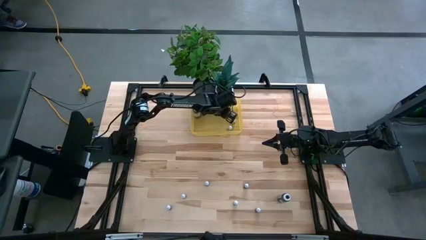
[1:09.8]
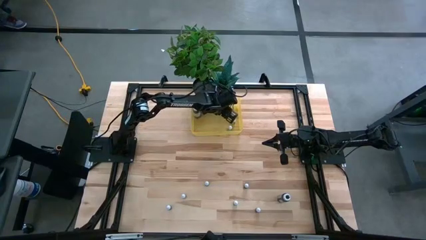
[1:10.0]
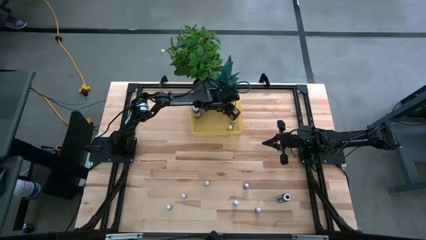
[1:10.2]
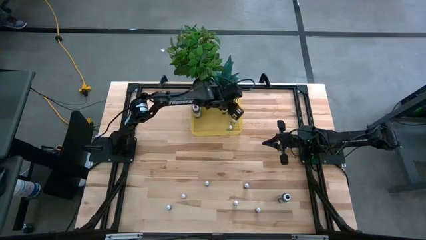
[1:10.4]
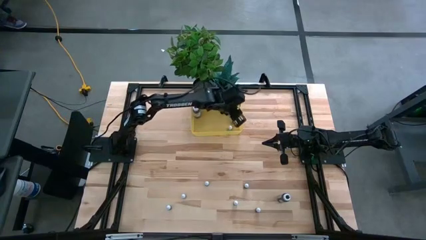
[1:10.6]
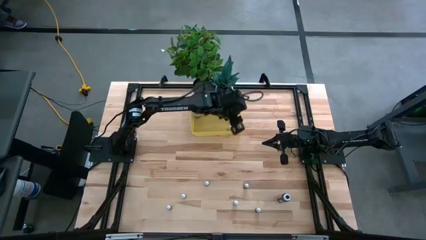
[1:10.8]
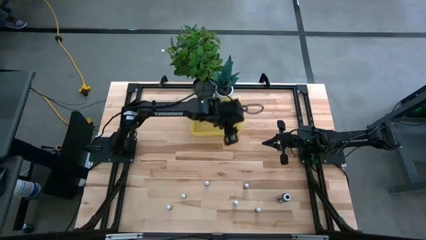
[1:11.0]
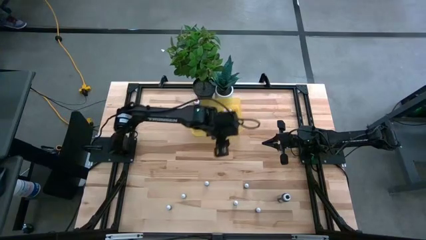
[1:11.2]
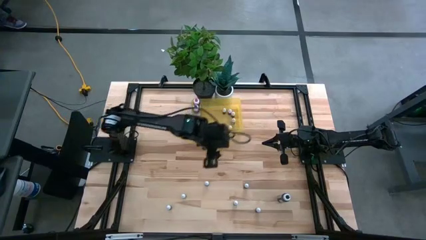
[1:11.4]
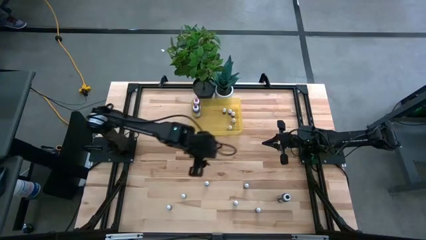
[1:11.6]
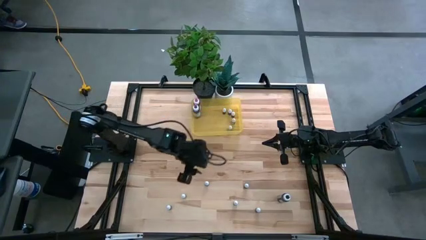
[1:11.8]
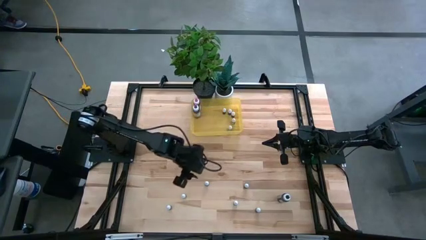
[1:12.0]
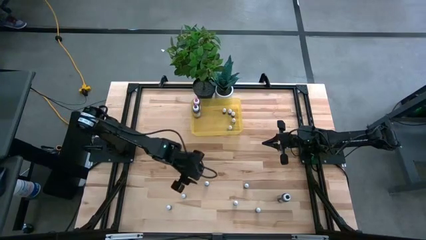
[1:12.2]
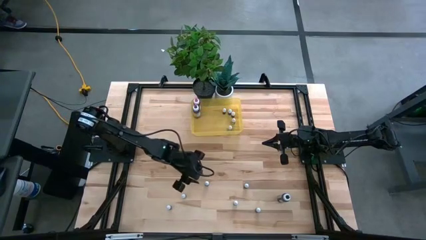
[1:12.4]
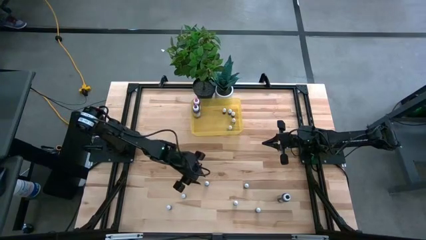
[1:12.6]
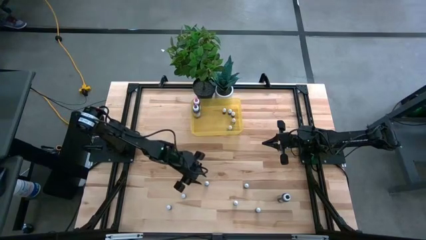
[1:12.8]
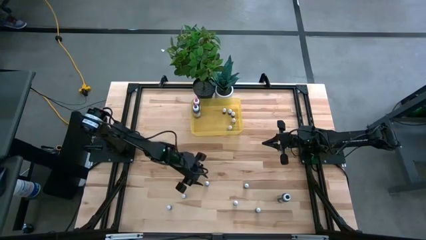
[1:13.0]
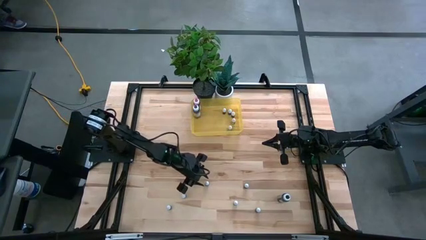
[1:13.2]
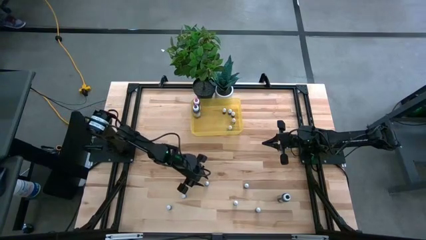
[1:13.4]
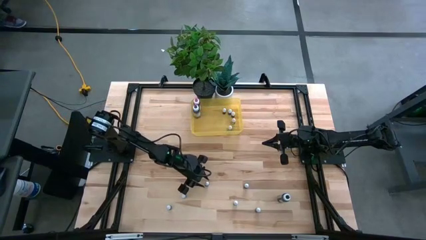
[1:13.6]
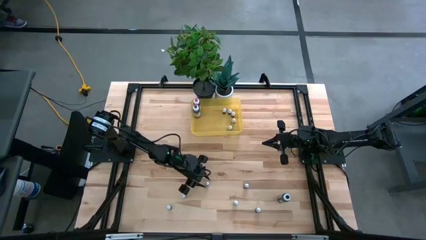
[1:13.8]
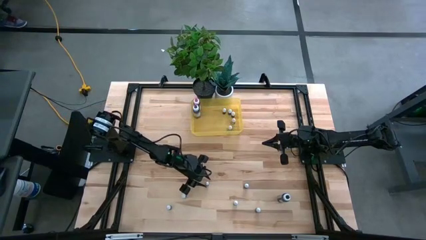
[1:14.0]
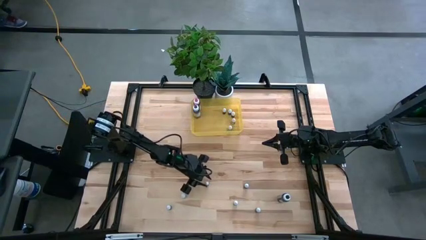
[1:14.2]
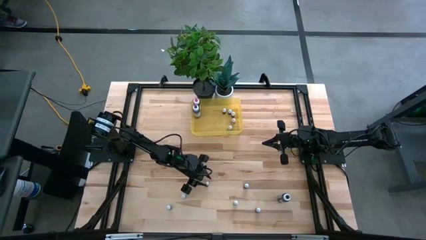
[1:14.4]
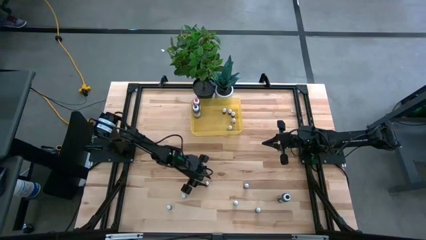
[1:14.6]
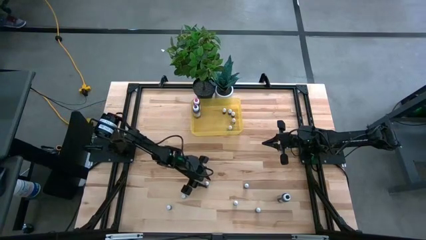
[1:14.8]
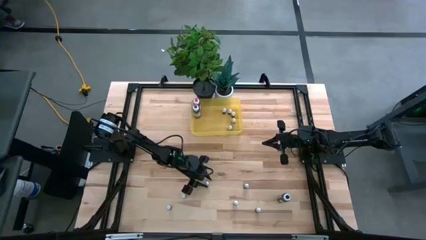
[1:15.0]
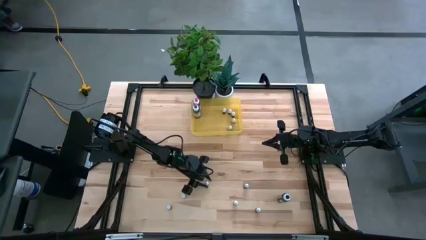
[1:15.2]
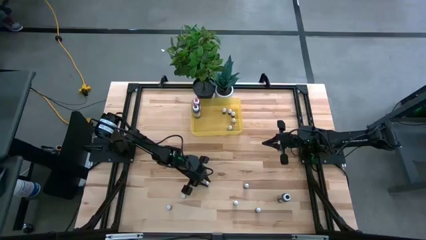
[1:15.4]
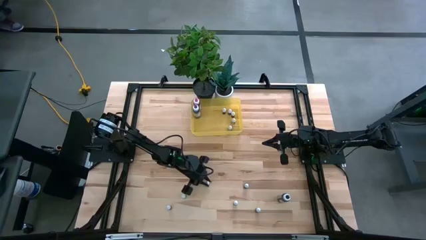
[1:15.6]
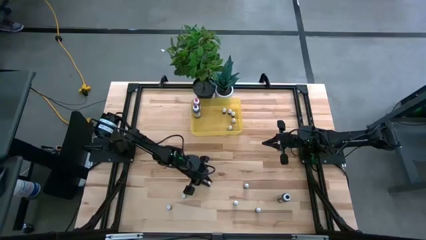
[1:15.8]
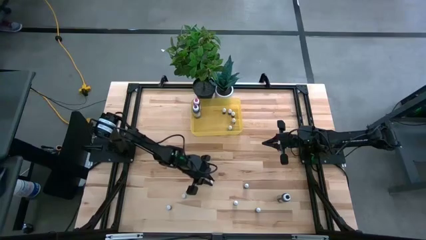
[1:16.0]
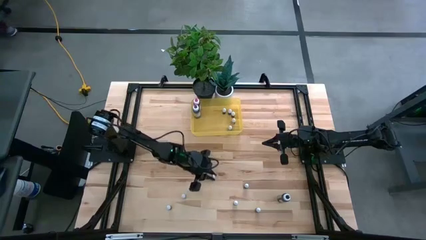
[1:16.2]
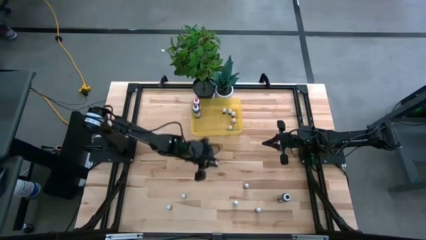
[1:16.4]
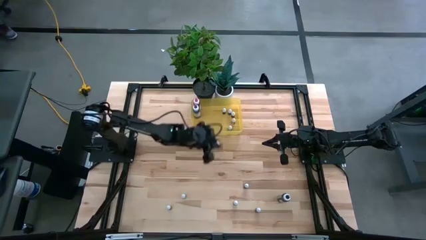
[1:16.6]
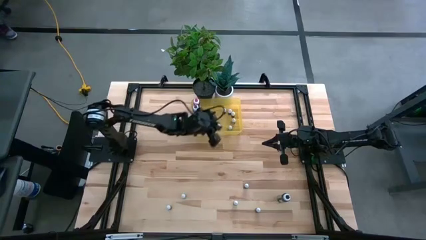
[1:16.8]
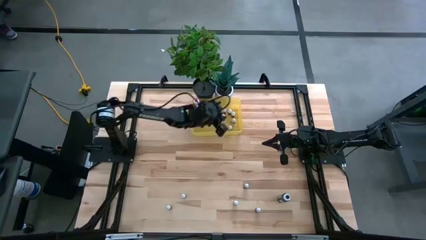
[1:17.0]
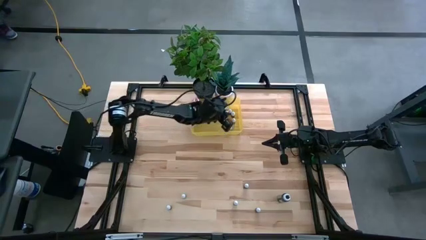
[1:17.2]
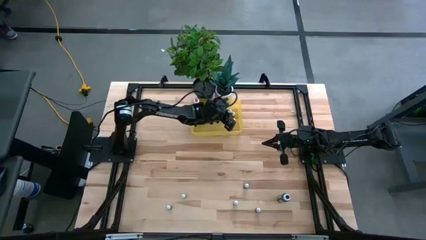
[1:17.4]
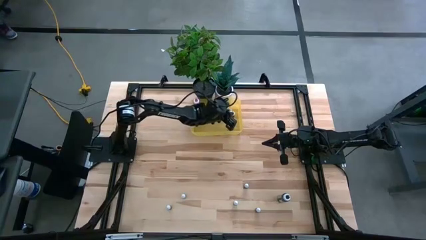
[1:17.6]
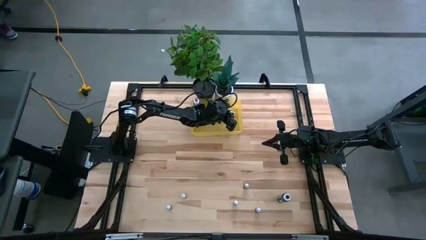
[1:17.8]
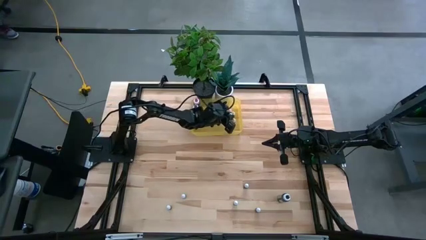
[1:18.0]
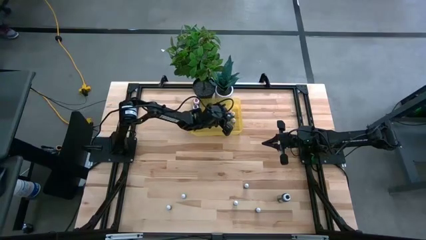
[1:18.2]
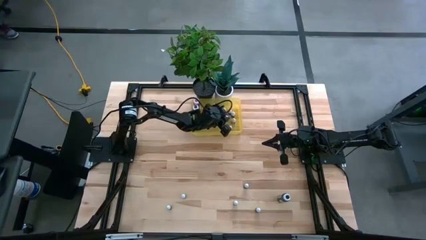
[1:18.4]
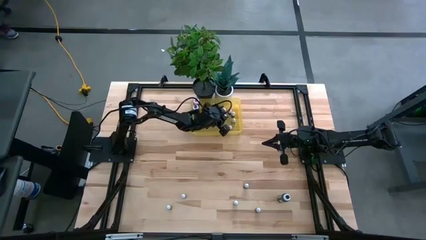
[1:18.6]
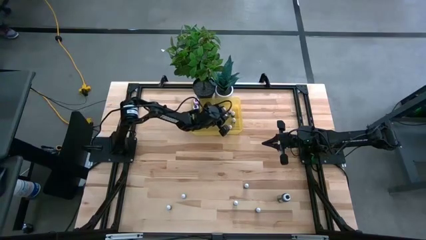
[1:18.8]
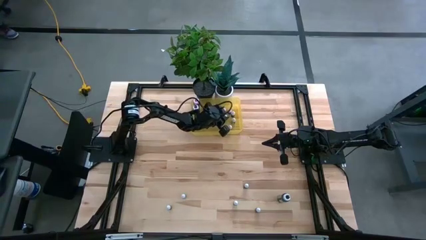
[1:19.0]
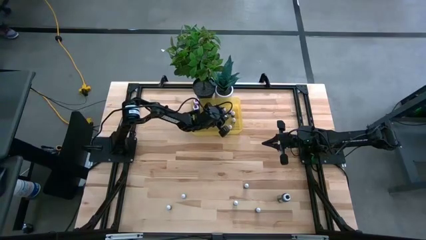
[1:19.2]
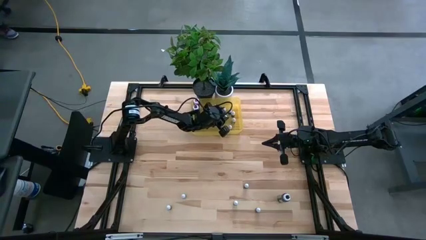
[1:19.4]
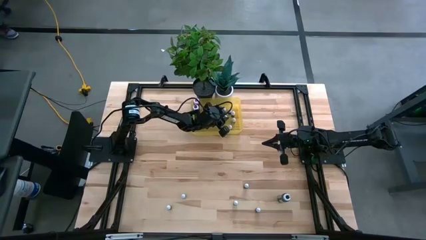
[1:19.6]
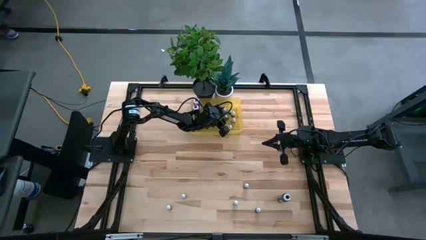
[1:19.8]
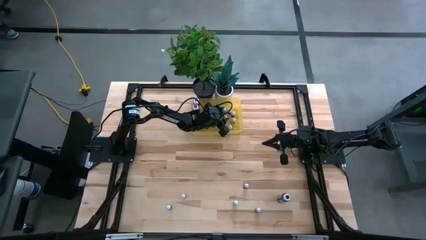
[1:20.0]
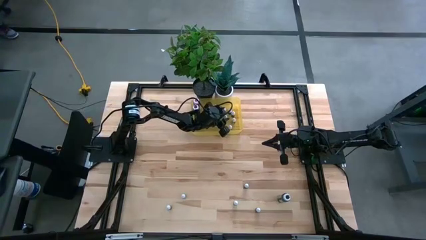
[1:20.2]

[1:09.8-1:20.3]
Task: Pick & Place food coloring
Put the top small black food coloring bottle into the yellow bin

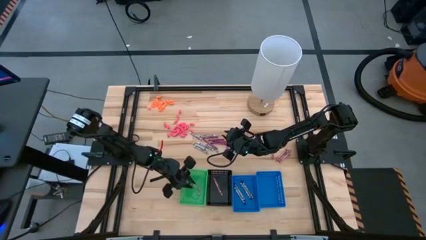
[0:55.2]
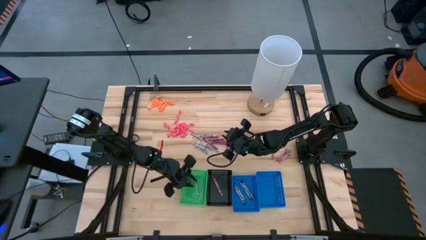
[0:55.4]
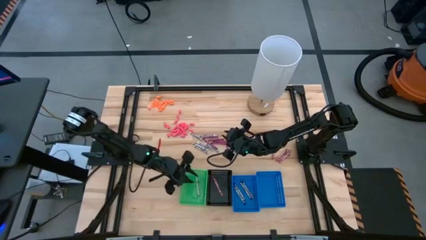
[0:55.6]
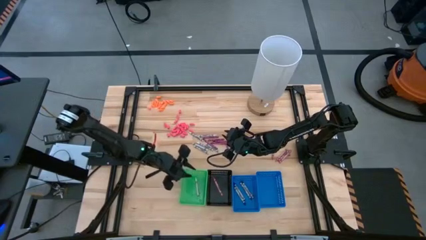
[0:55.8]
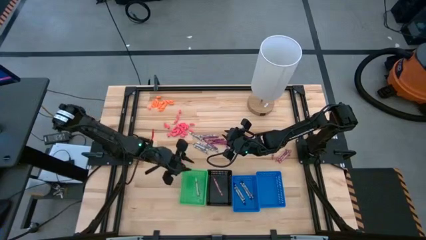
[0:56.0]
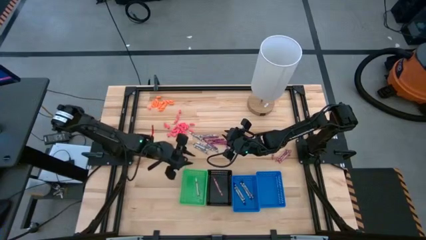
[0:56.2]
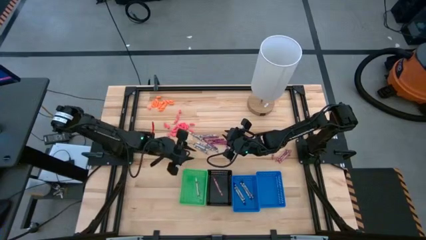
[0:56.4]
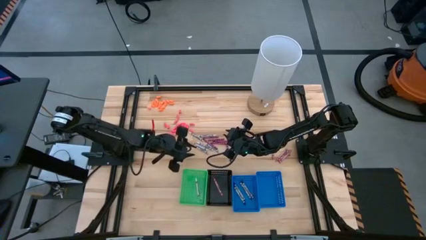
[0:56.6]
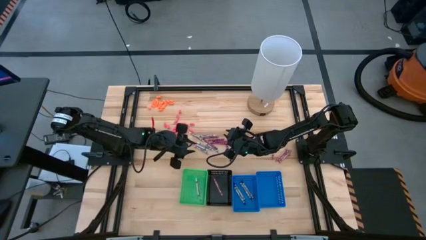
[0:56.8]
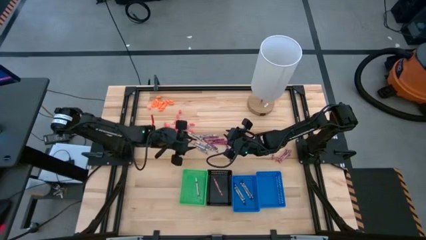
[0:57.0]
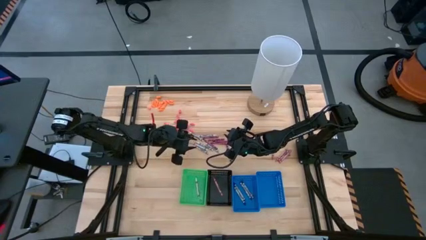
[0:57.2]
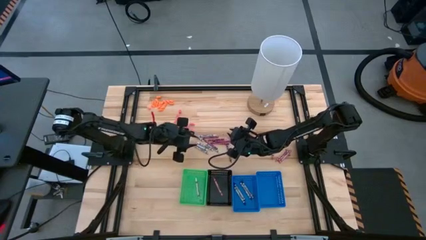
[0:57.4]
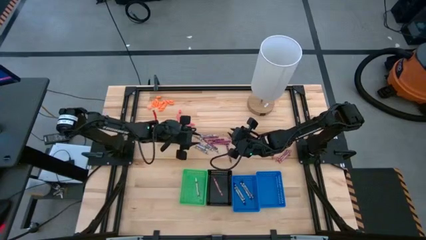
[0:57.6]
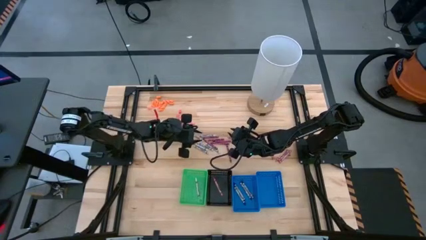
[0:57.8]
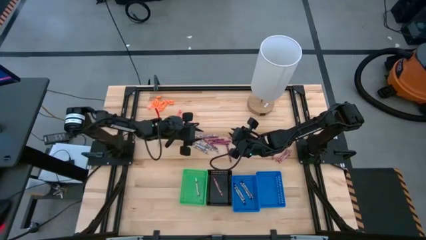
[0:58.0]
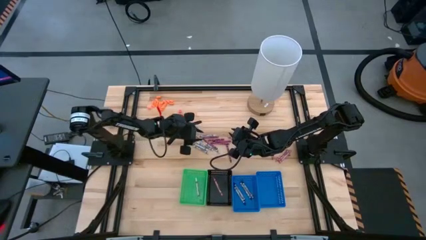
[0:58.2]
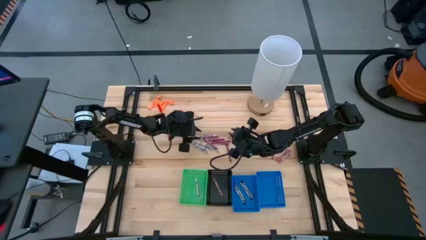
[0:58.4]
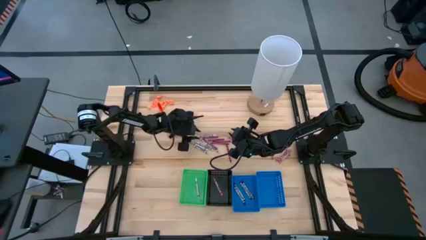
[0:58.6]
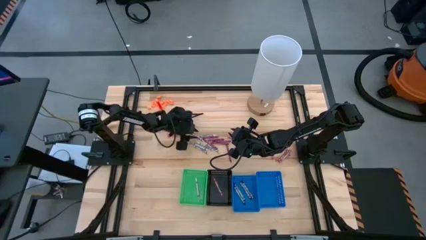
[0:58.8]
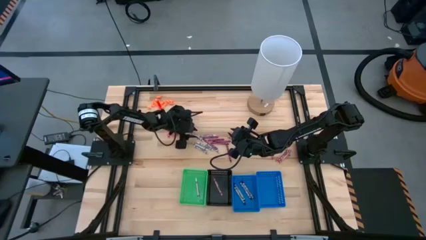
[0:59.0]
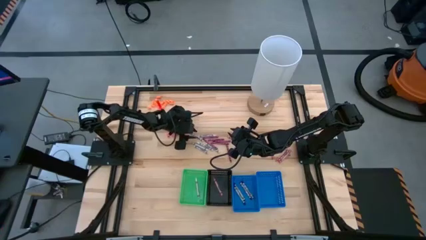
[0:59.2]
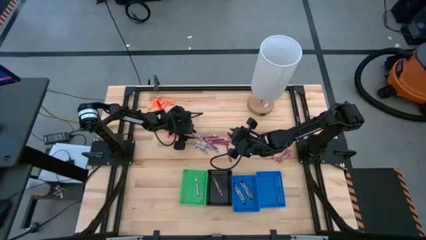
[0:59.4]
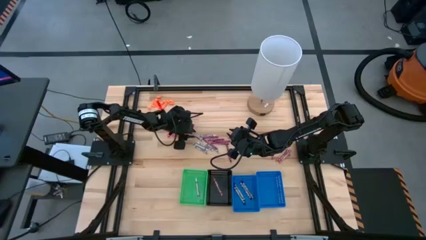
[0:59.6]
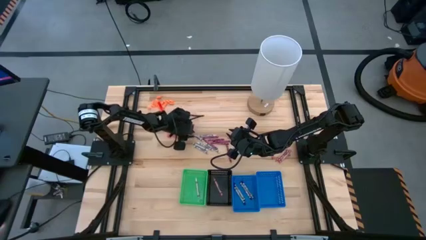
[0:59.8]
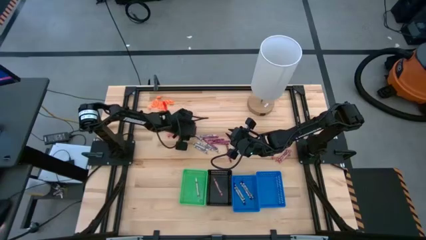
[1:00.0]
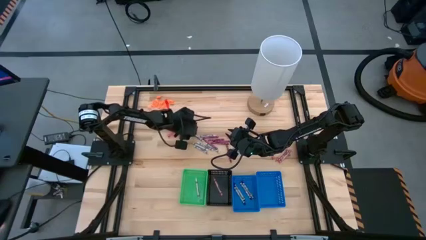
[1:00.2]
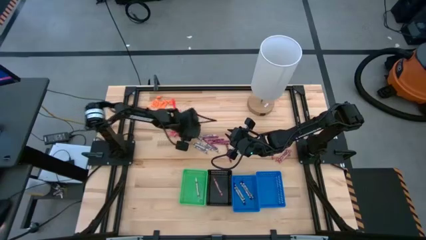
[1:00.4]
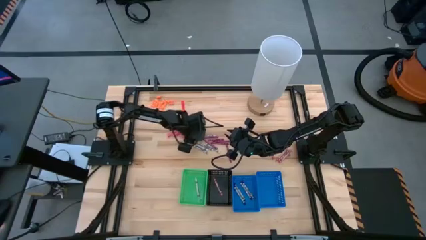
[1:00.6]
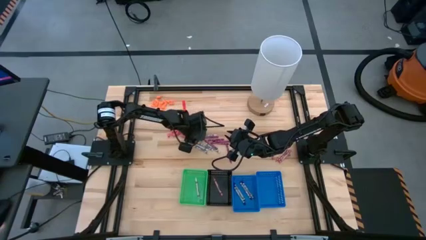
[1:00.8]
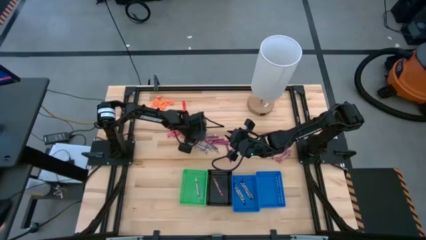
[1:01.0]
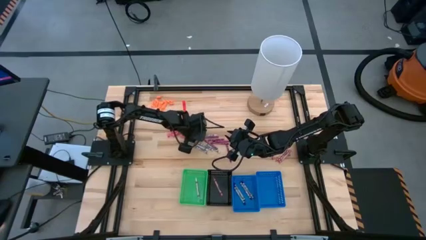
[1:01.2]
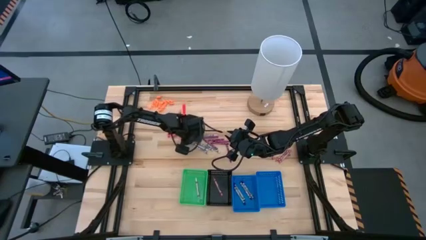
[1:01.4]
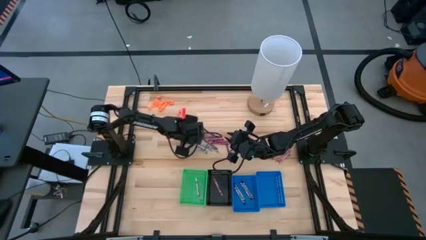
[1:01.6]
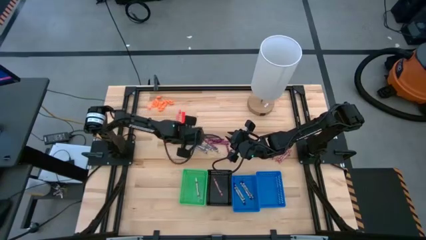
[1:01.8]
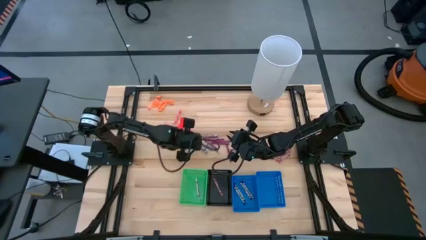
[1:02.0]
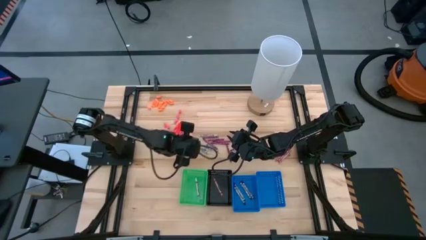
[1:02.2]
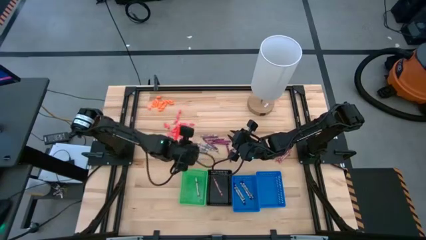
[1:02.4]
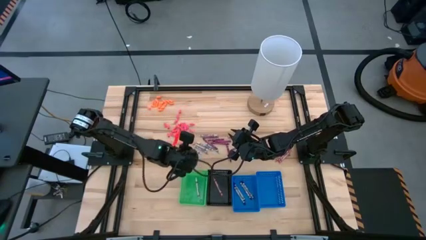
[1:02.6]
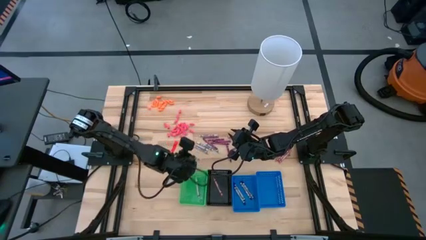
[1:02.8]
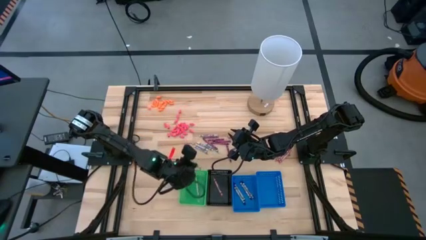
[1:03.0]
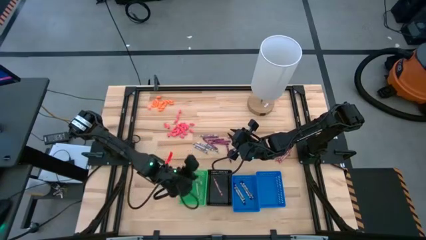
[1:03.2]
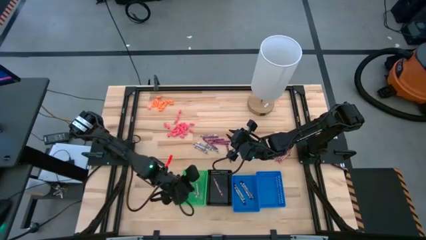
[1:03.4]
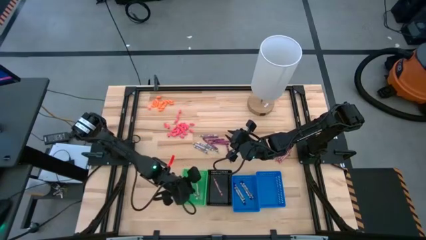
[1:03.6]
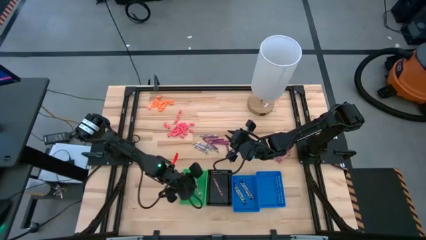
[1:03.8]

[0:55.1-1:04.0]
Task: Sort crayons
Put the white crayon into the green bin
